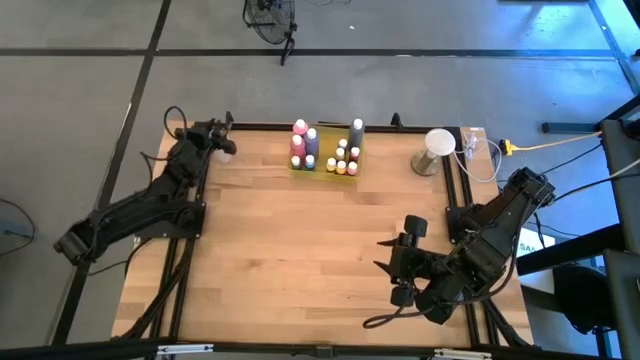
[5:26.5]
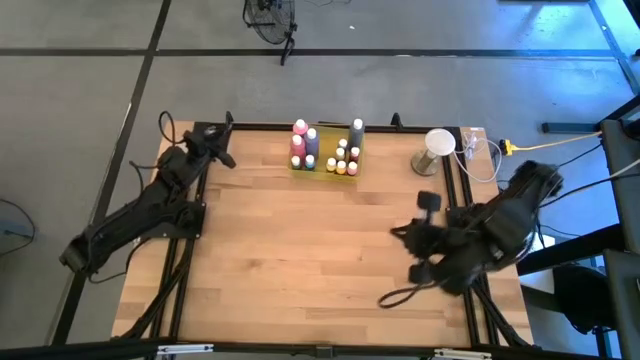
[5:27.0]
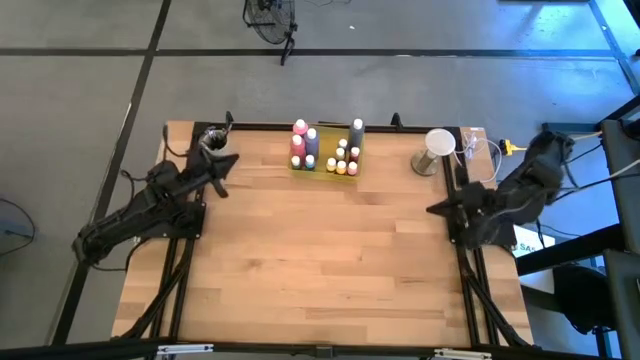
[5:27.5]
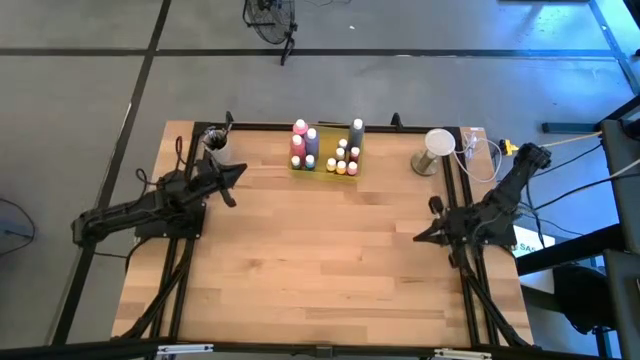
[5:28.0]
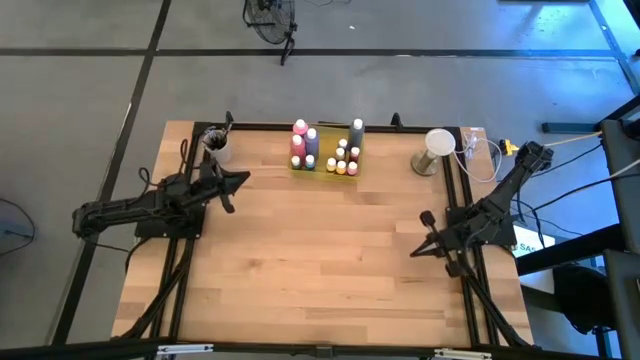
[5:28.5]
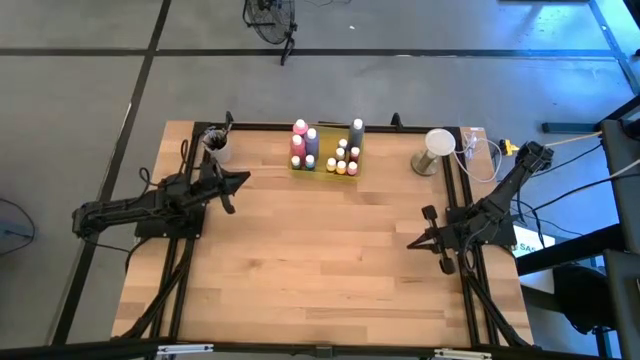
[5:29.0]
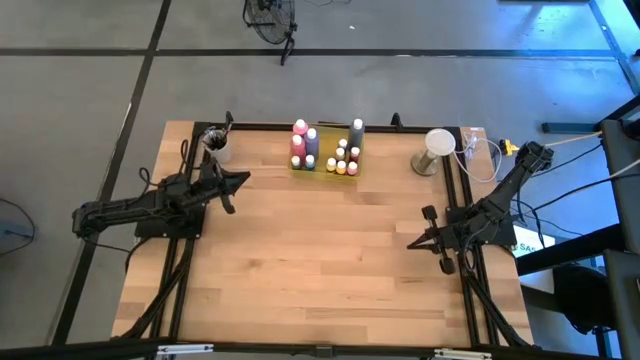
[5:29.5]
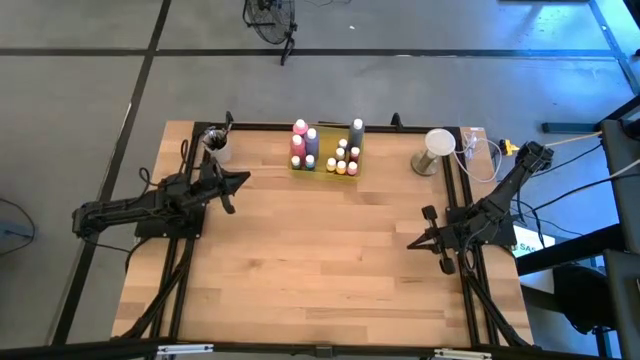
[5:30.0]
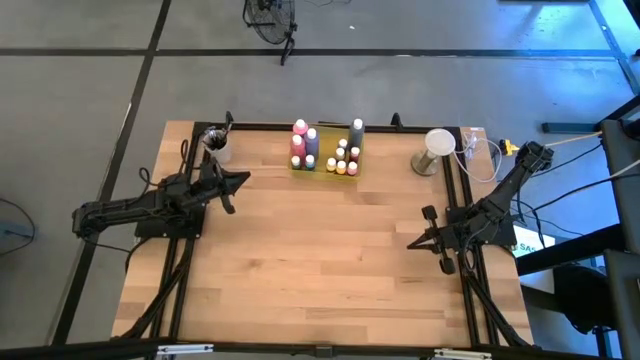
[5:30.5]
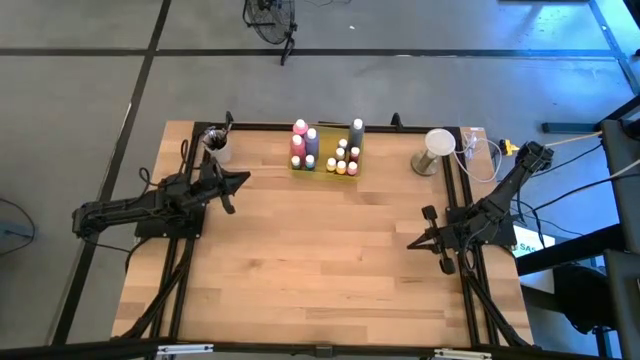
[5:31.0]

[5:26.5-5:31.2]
Task: Pick & Place Paint Supplies
Return To Home Position

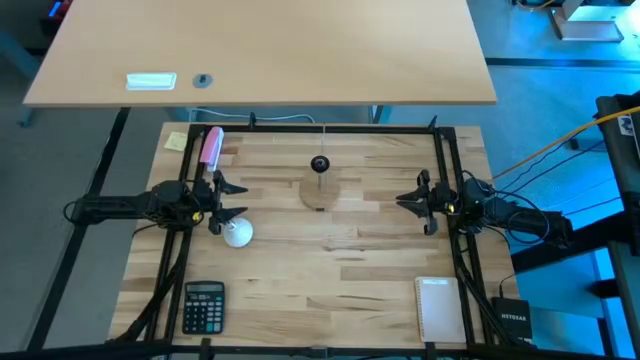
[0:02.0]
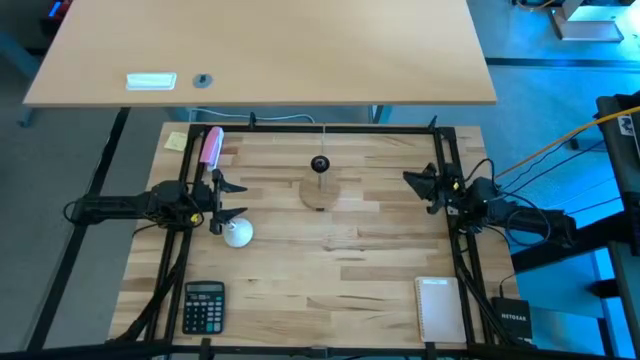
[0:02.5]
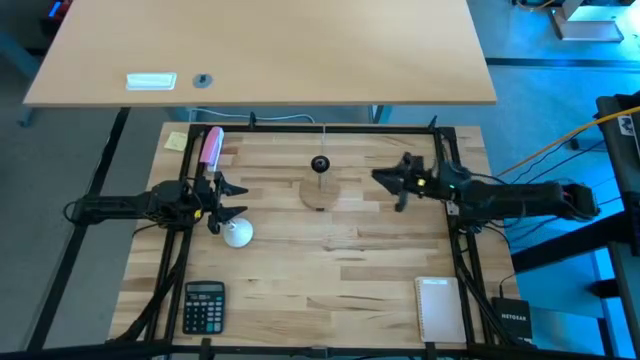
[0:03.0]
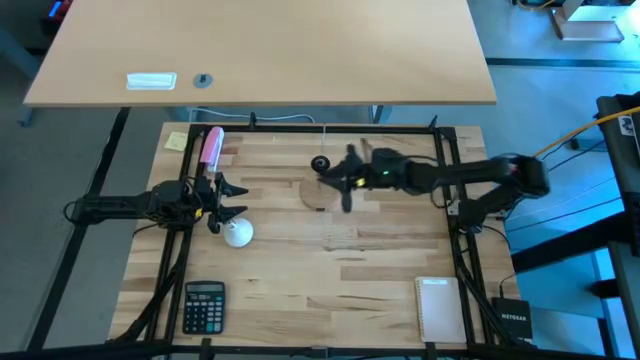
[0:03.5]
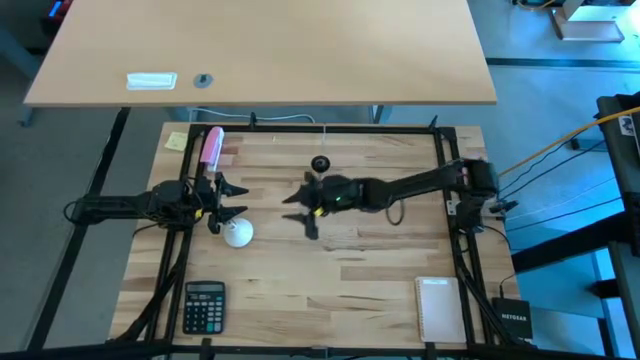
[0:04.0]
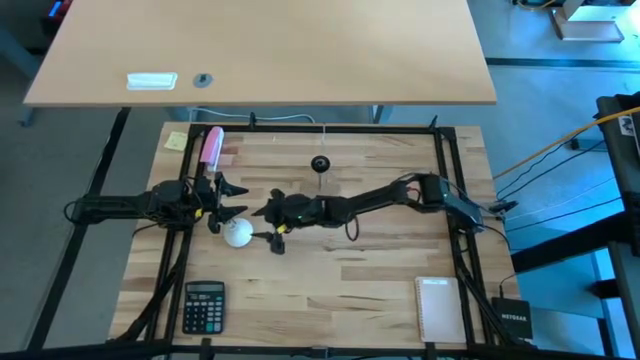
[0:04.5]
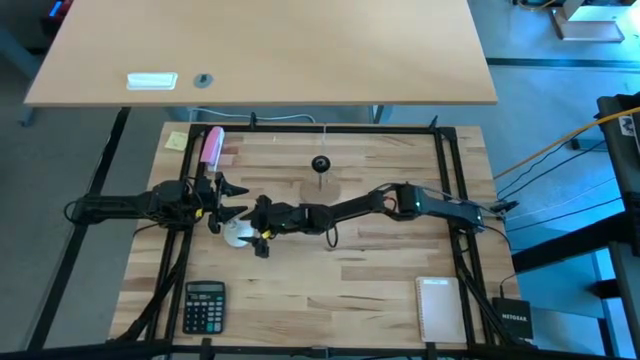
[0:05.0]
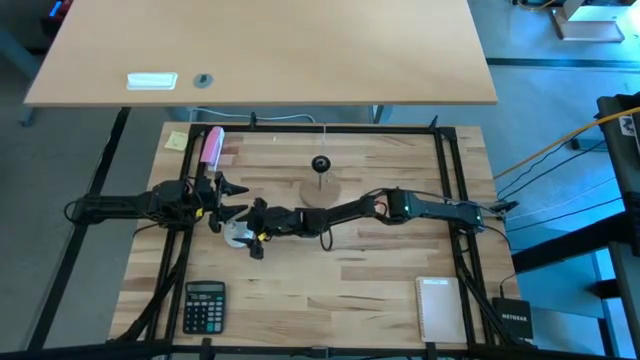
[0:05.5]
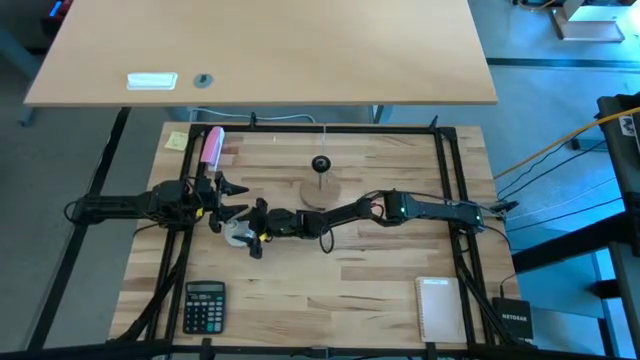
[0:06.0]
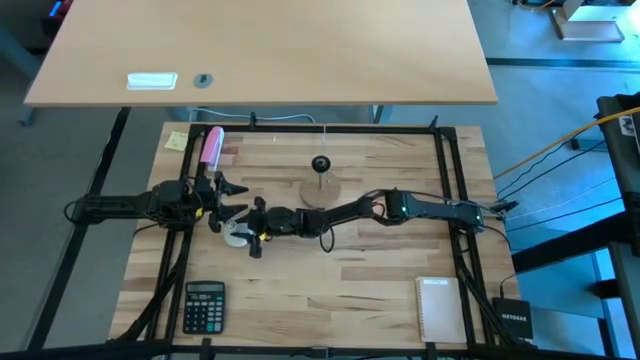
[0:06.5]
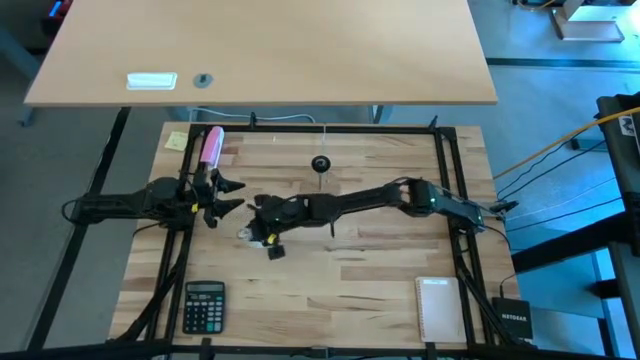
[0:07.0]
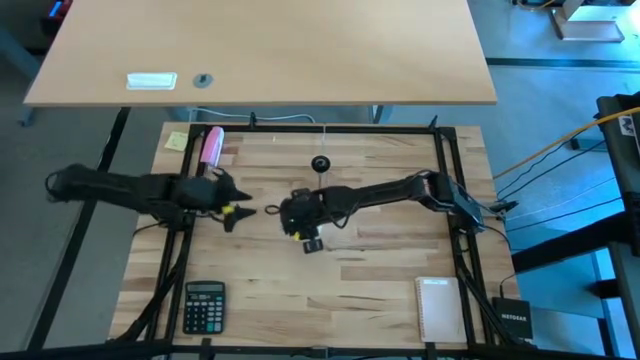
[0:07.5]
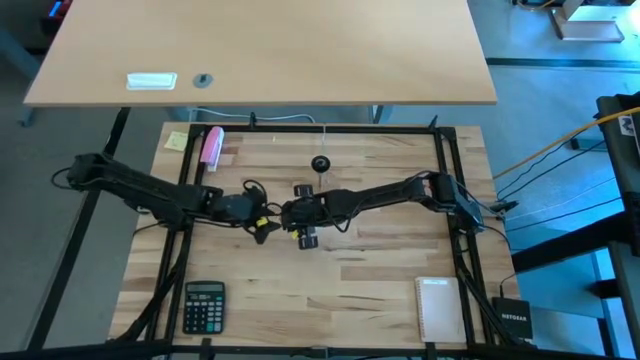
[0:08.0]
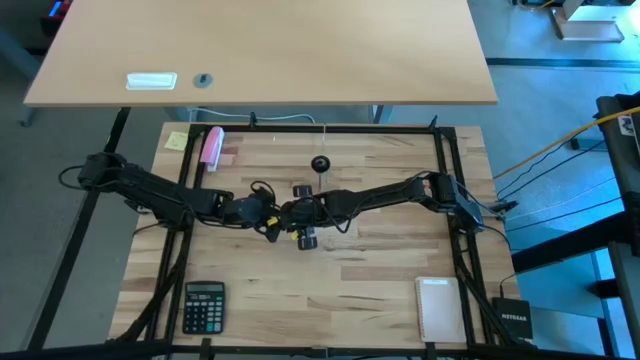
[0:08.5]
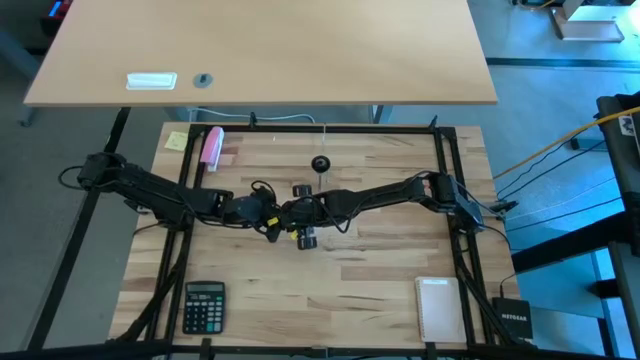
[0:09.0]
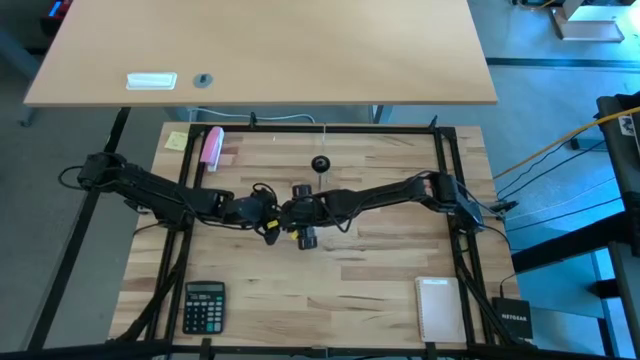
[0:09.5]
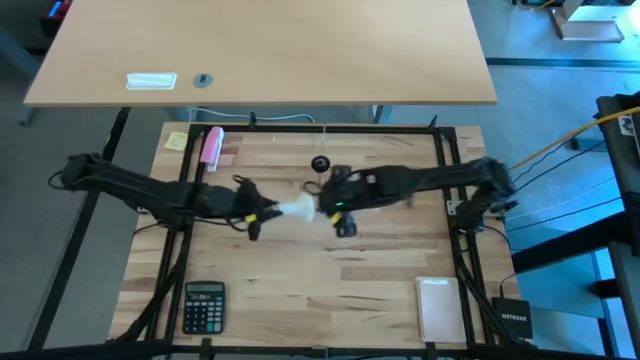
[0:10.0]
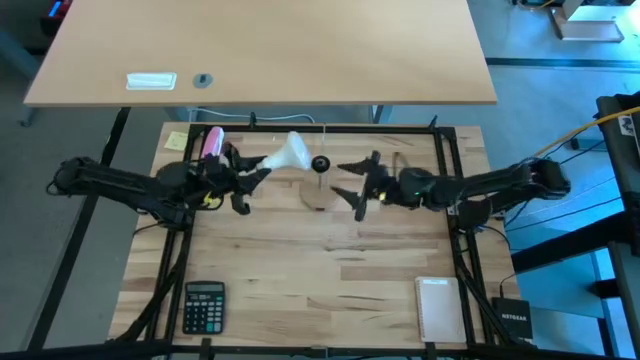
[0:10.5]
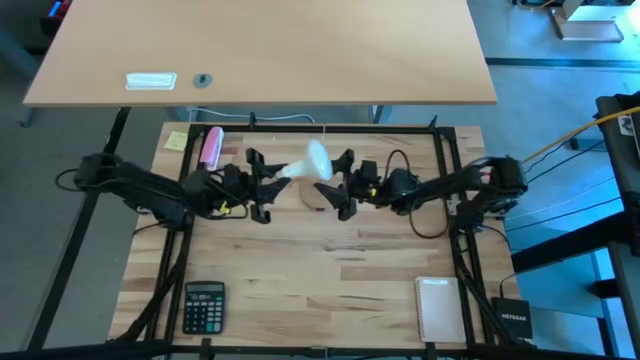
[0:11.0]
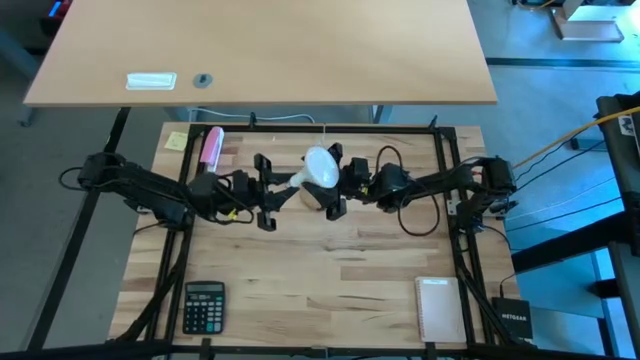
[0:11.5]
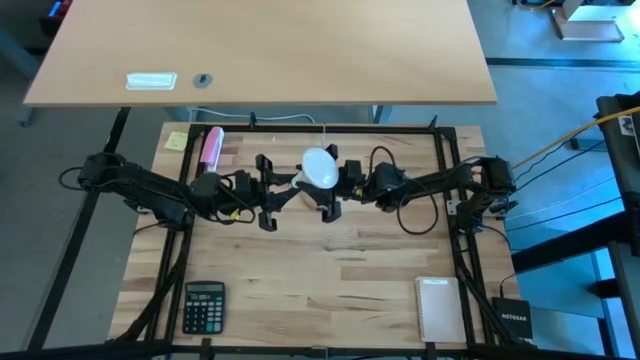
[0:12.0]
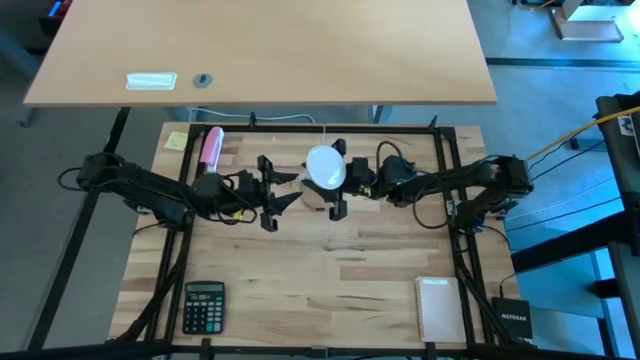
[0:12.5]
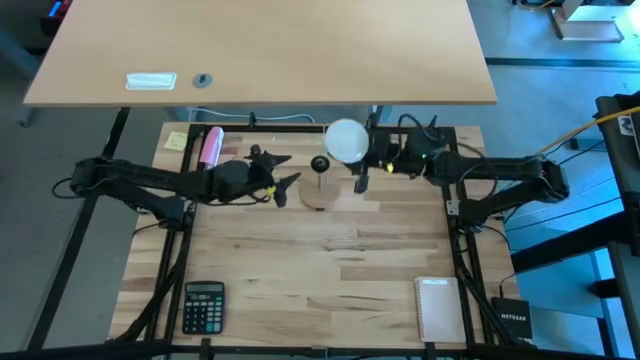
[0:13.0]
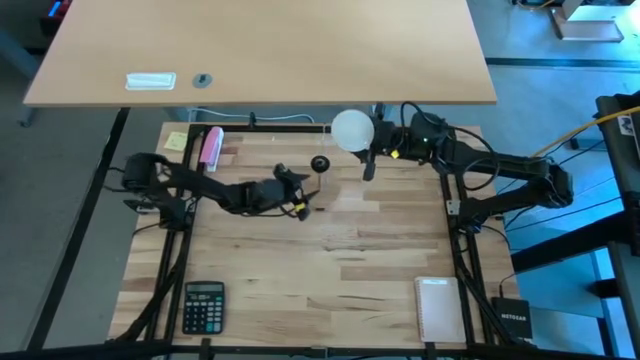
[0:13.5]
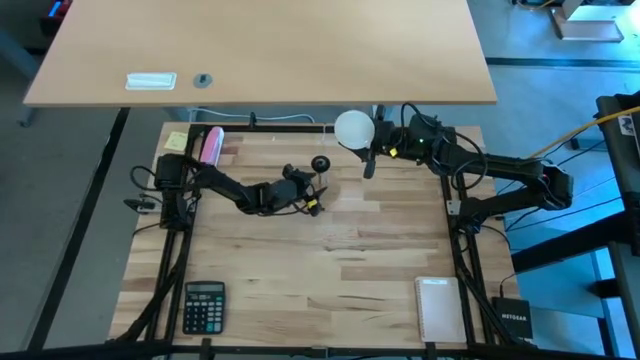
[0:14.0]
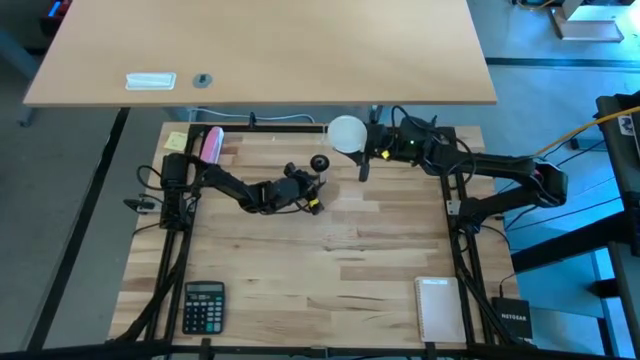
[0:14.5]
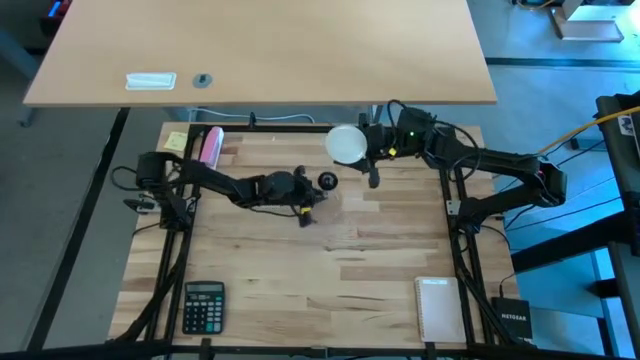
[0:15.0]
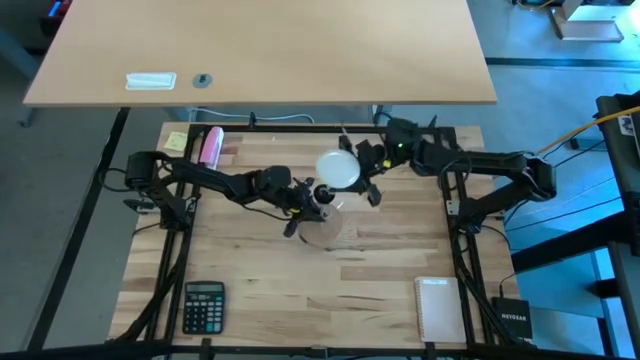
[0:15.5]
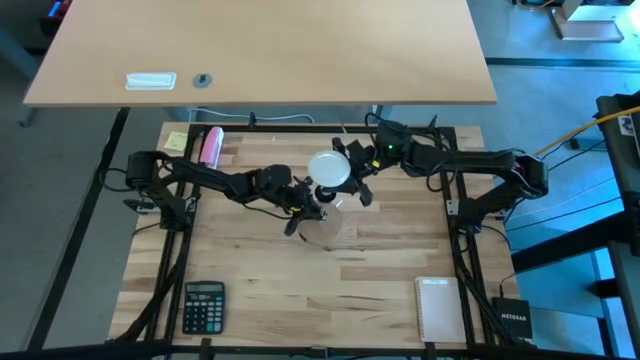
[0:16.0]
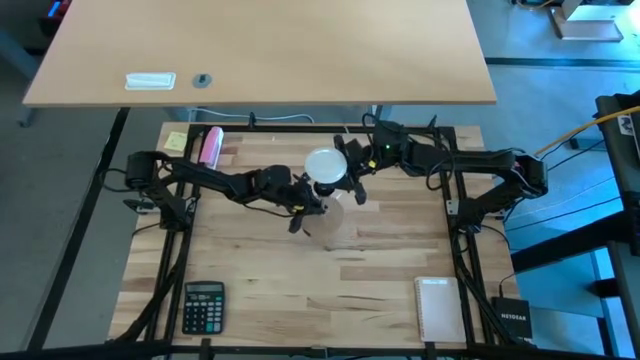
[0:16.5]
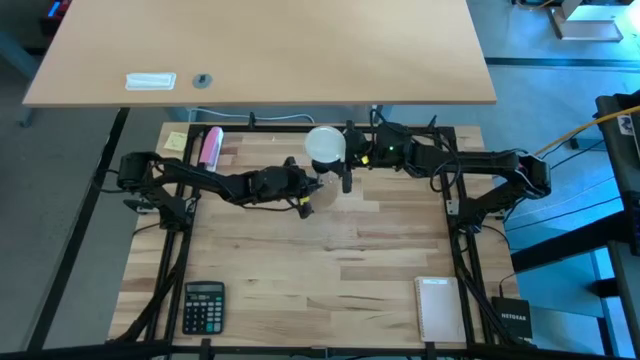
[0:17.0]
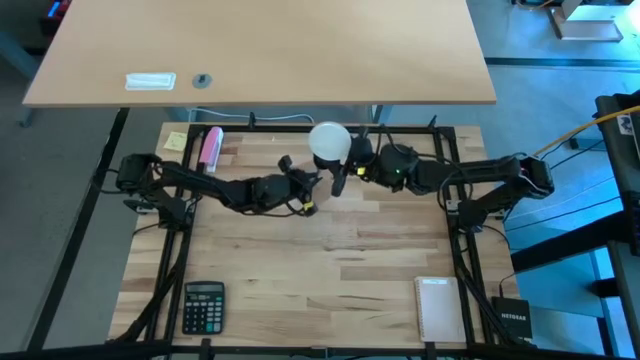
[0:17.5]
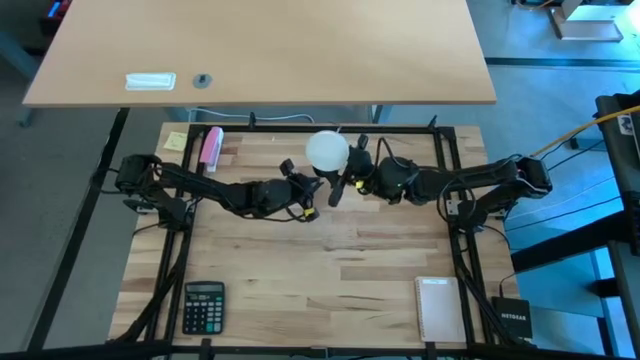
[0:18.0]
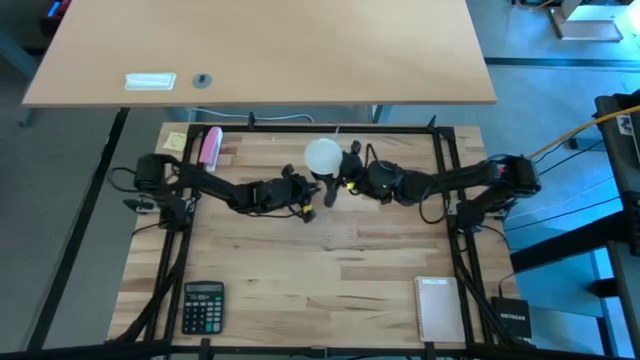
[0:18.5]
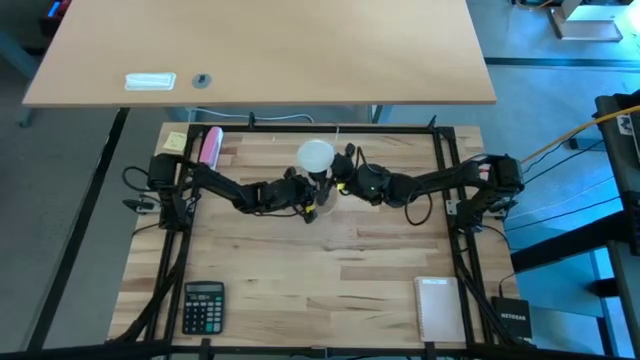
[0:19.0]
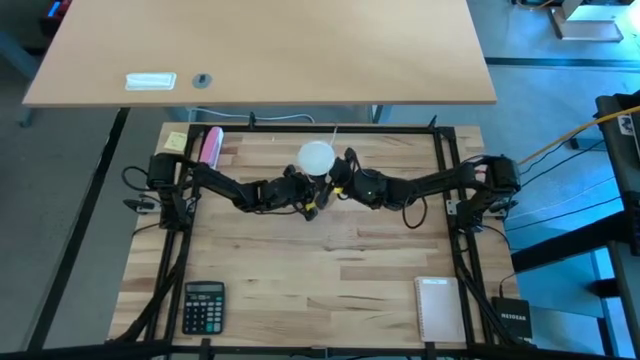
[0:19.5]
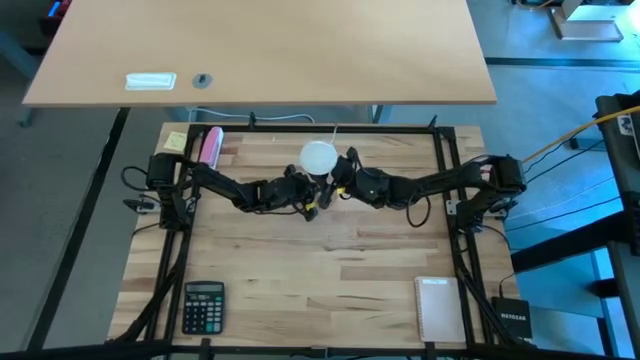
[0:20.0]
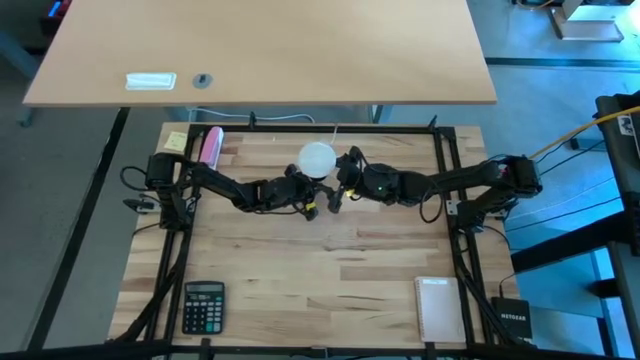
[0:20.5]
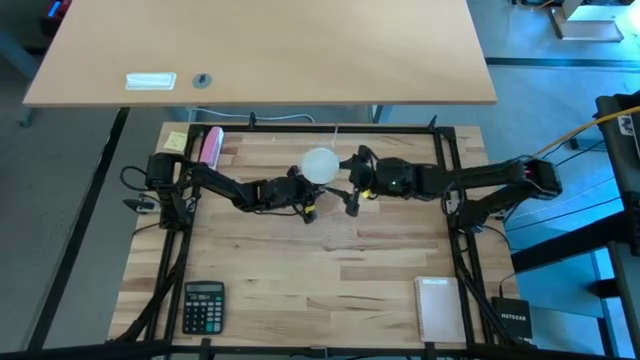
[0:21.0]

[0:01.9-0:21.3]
Task: Screw lightbulb
Insert the white lightbulb into the brown lamp
